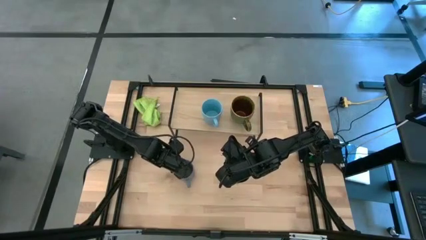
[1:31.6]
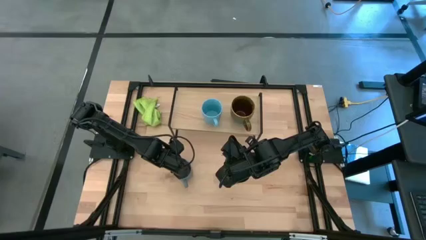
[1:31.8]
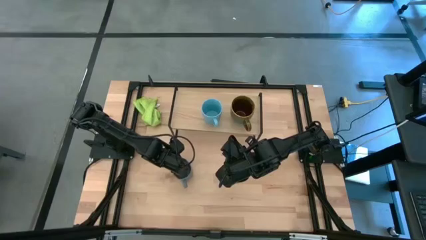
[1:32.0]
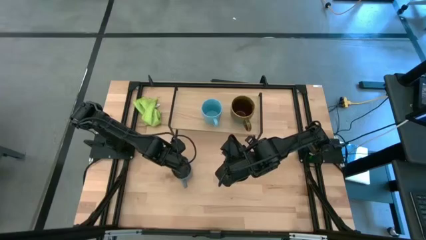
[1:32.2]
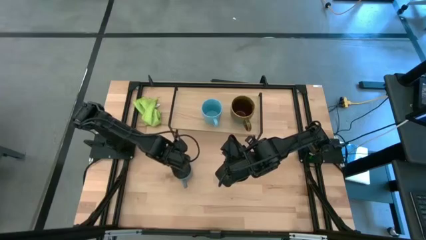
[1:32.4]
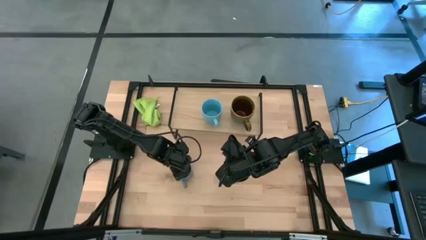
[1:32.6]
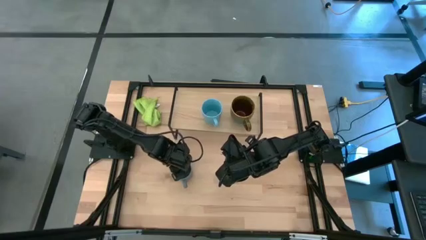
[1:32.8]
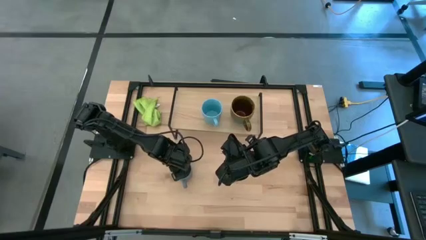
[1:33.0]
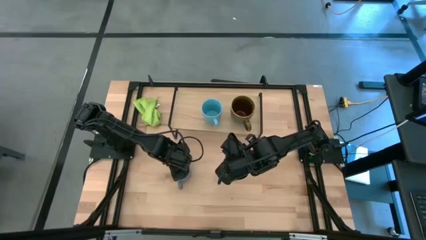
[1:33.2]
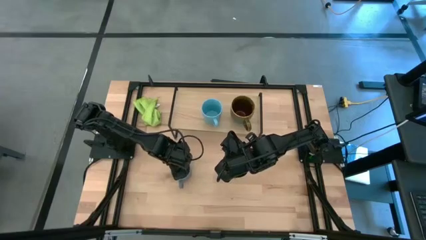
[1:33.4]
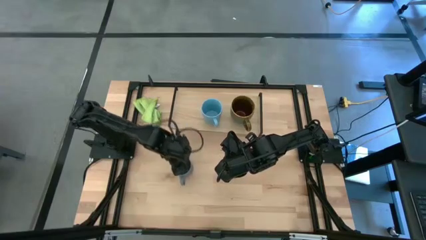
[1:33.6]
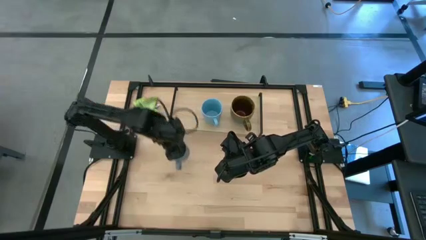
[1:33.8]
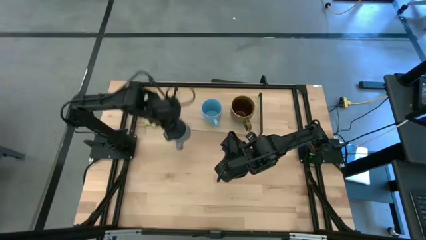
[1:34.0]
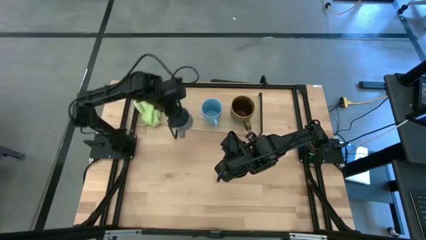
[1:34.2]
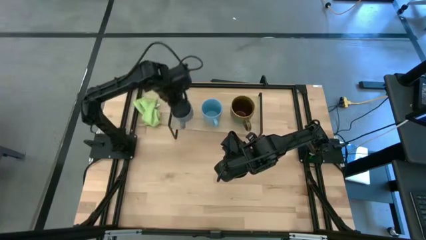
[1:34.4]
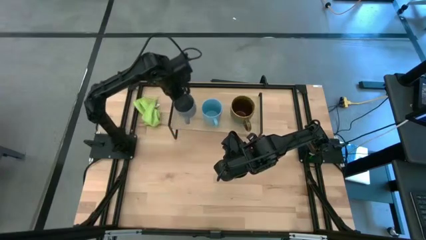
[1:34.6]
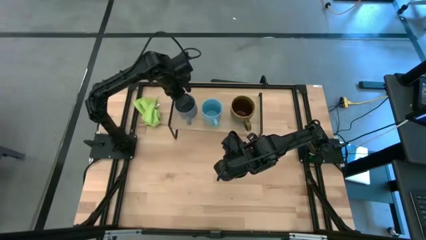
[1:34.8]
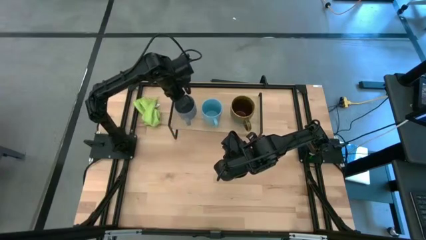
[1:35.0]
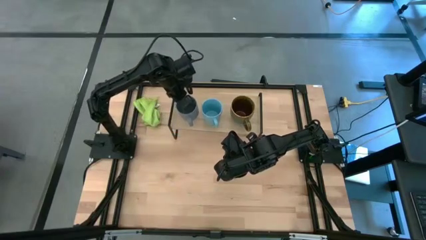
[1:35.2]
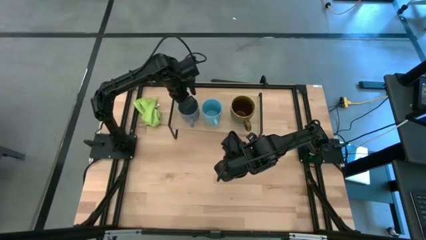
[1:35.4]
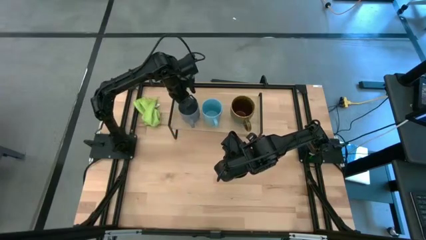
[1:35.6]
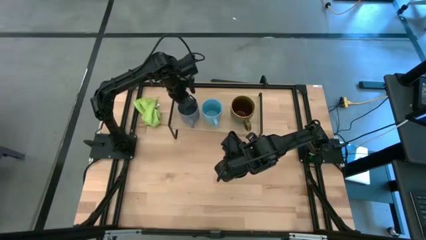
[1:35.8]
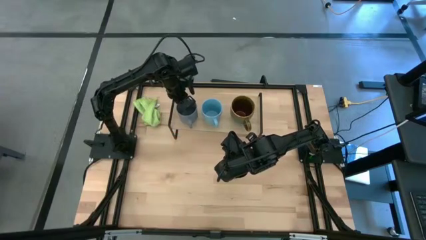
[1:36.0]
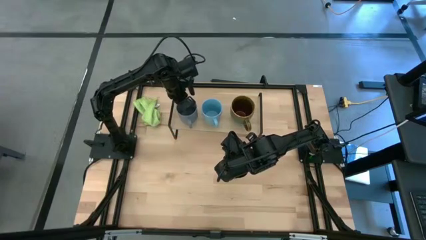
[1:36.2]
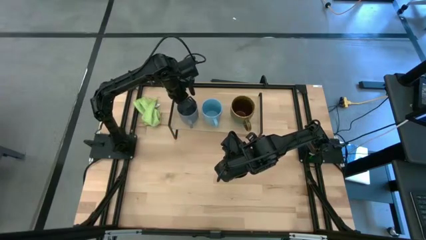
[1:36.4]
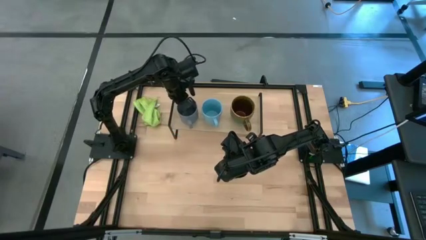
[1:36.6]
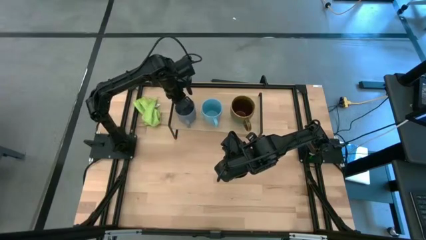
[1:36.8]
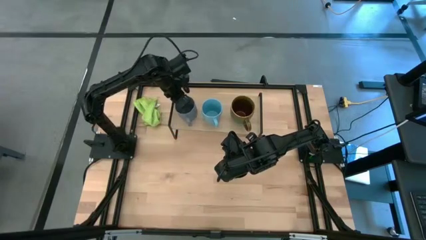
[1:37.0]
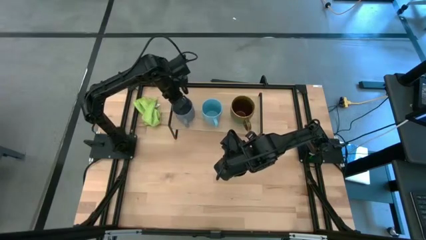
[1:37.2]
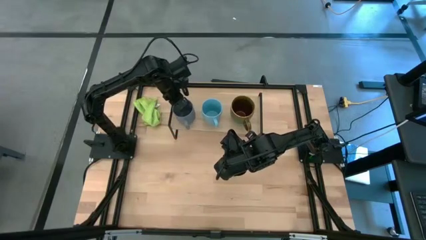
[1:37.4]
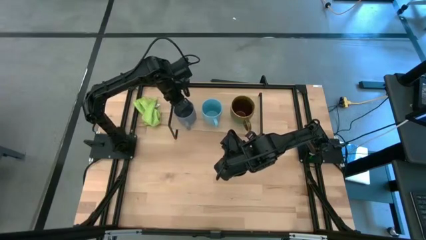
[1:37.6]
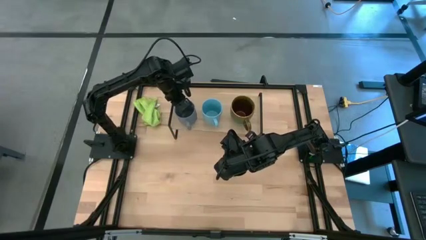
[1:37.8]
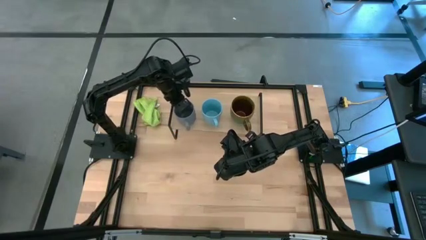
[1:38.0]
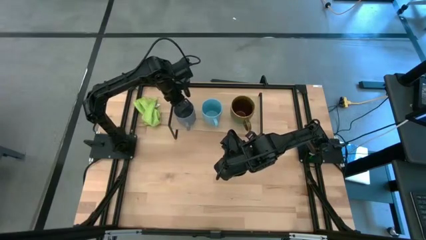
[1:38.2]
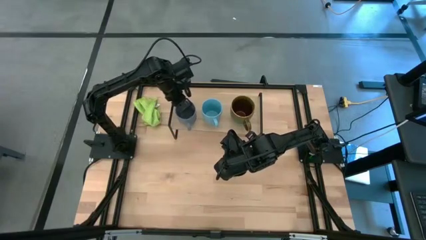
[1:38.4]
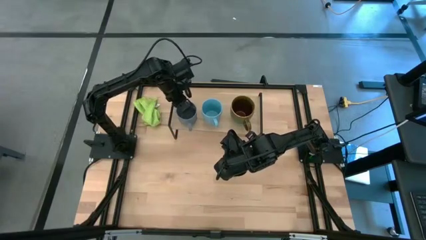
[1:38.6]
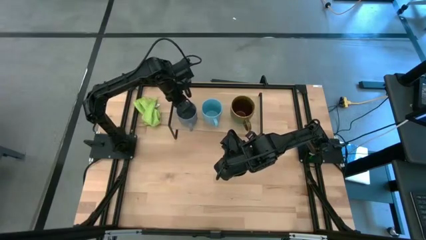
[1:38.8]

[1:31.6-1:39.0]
Task: Stack small to large cups/mugs on shelf
Put the gray mug on the shelf

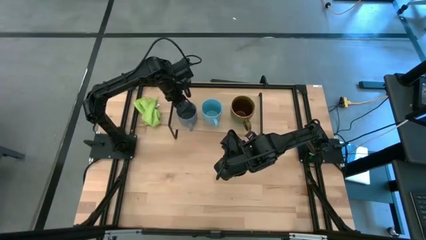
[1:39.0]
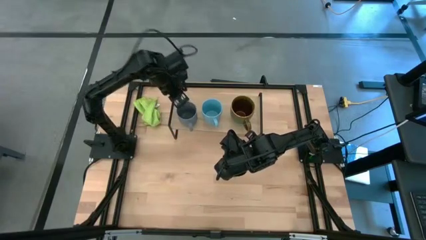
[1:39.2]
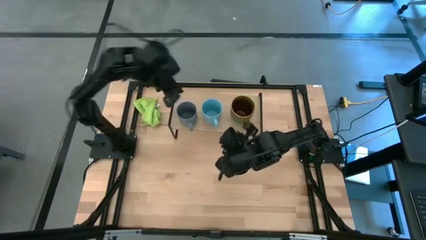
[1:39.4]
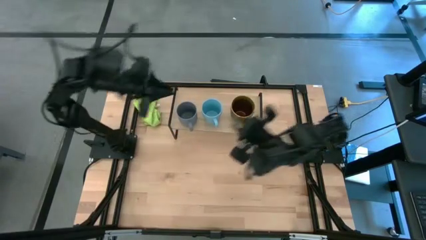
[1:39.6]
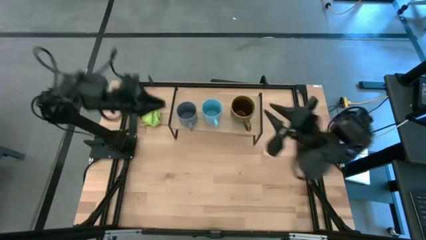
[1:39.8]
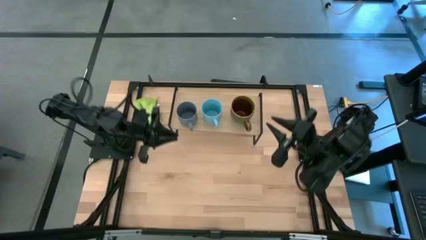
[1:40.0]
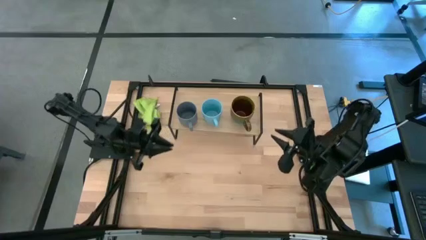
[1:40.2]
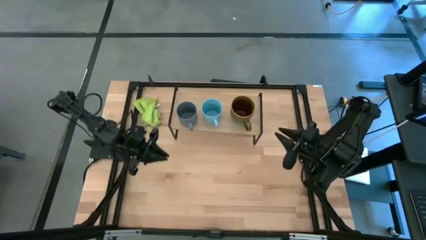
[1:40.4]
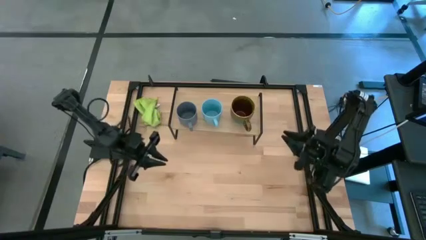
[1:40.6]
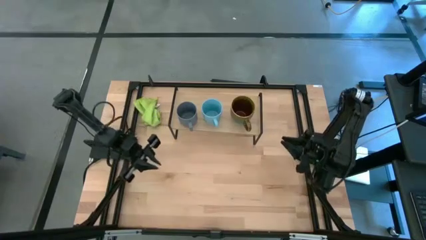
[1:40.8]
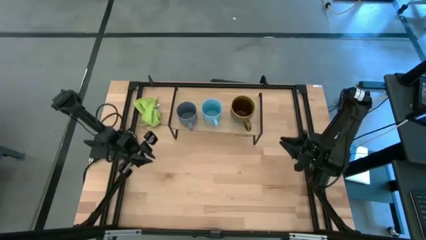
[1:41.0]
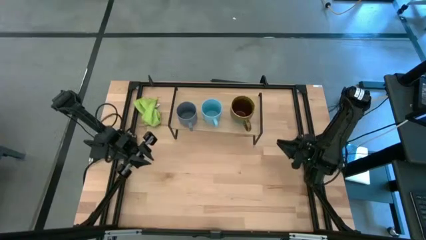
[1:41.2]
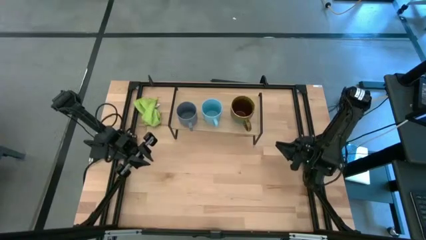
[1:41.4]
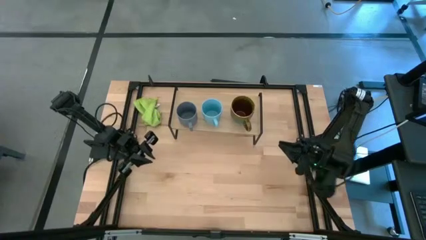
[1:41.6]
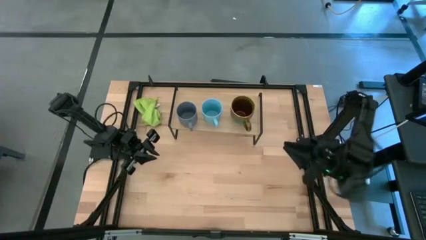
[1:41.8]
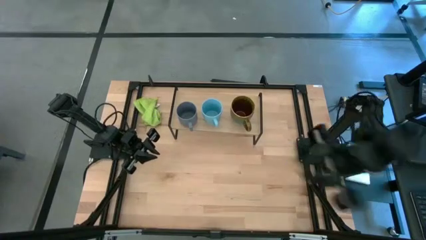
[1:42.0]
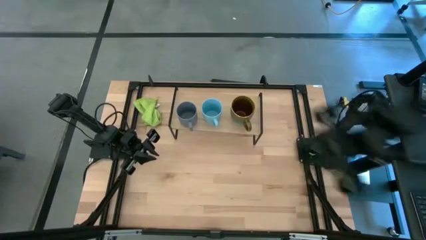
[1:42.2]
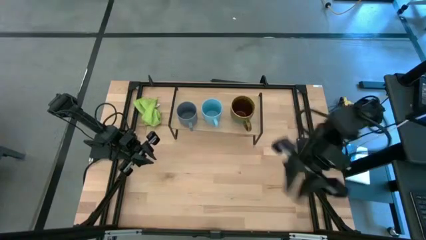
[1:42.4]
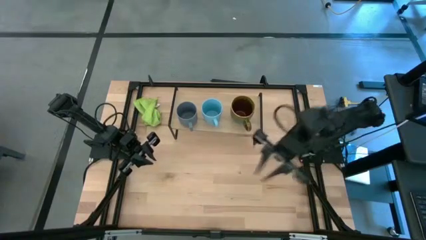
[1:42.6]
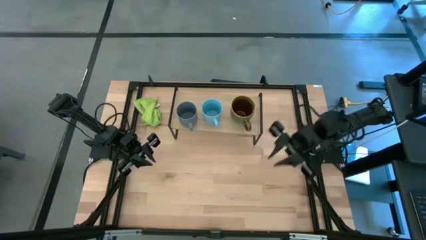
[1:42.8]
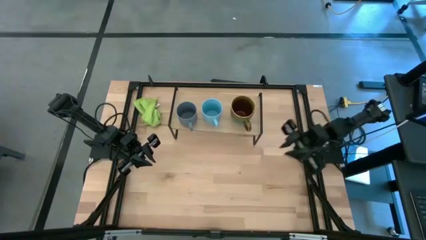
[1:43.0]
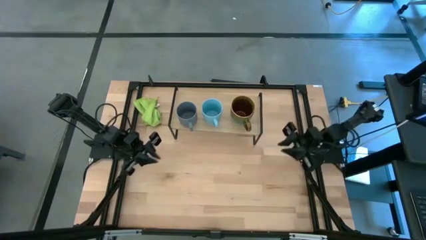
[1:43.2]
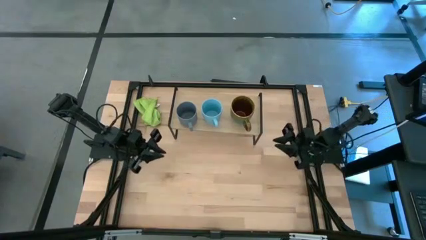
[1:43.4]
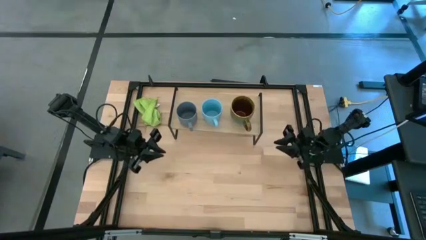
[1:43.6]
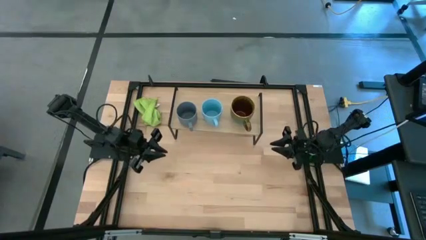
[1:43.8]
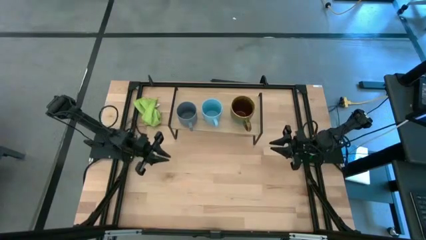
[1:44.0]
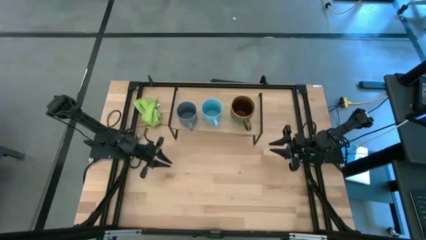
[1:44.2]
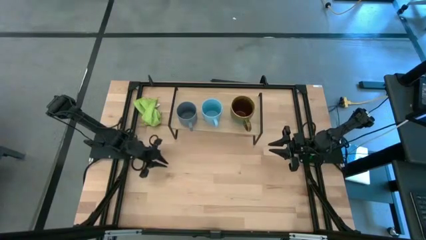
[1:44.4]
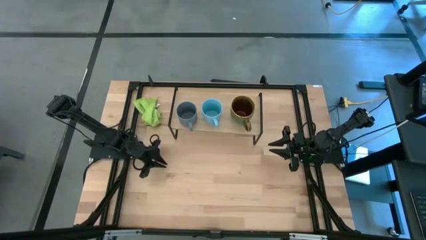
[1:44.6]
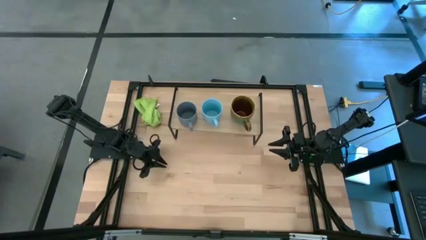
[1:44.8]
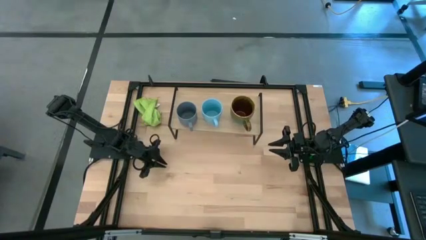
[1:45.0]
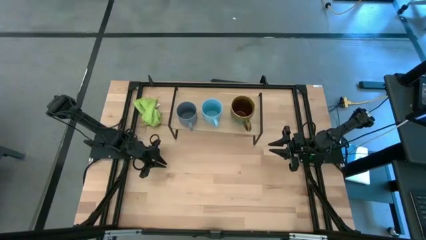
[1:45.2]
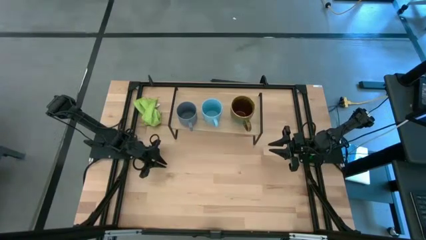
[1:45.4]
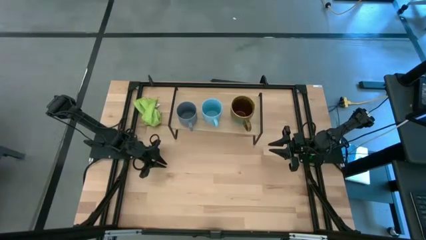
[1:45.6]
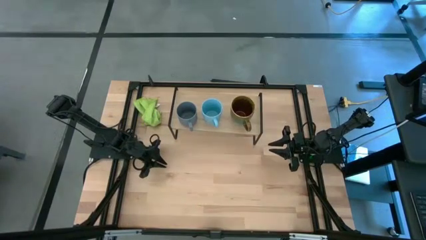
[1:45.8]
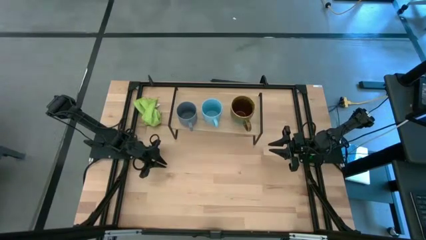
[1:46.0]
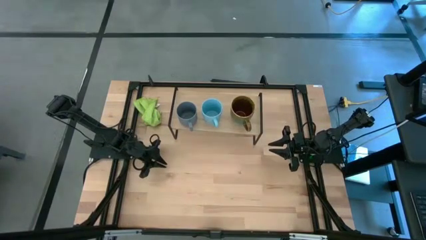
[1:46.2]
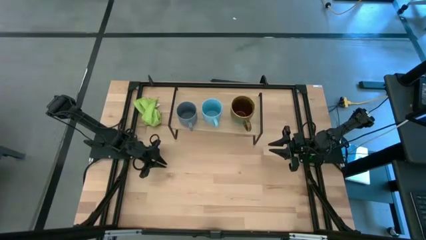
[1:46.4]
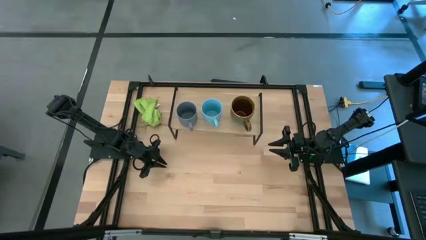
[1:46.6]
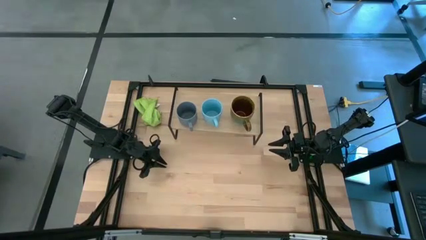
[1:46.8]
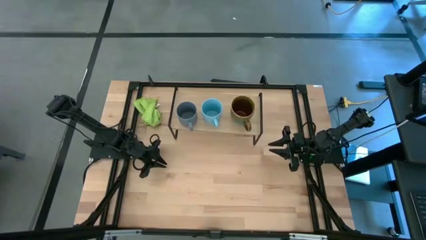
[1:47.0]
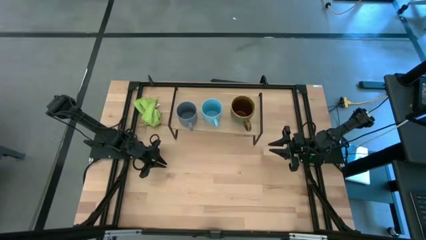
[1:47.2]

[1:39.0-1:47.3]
Return to Home Position
